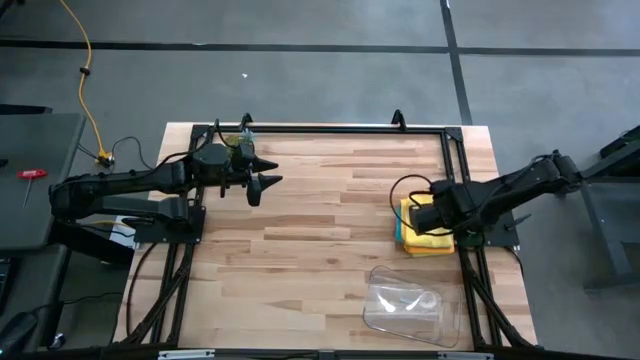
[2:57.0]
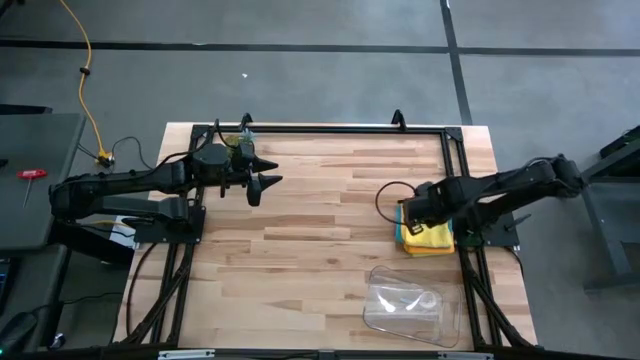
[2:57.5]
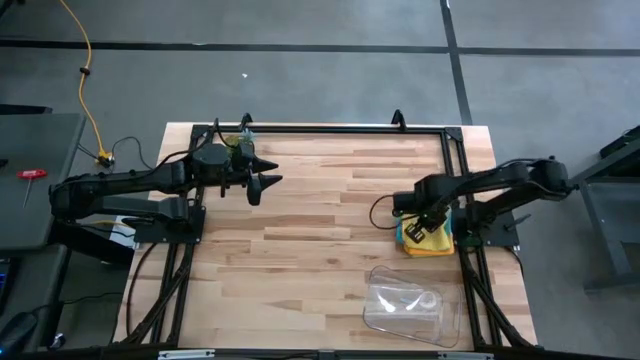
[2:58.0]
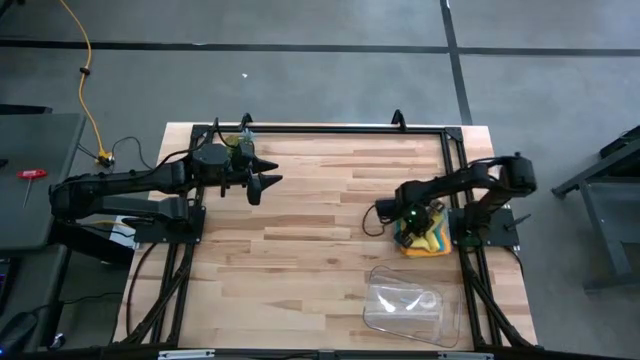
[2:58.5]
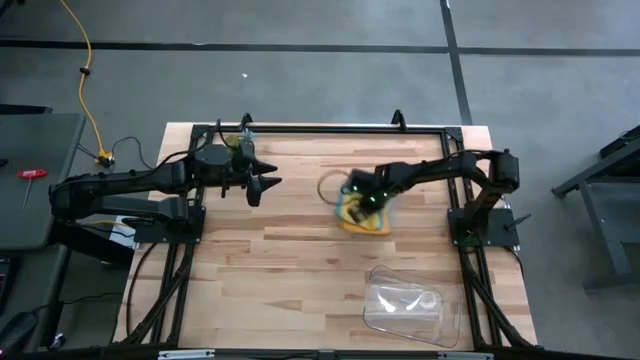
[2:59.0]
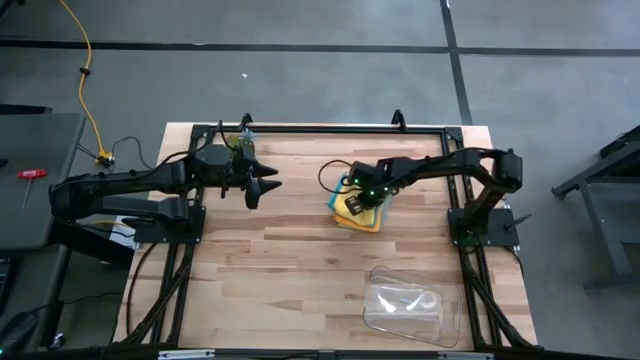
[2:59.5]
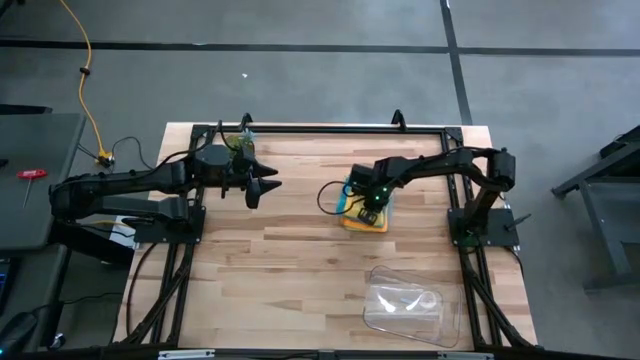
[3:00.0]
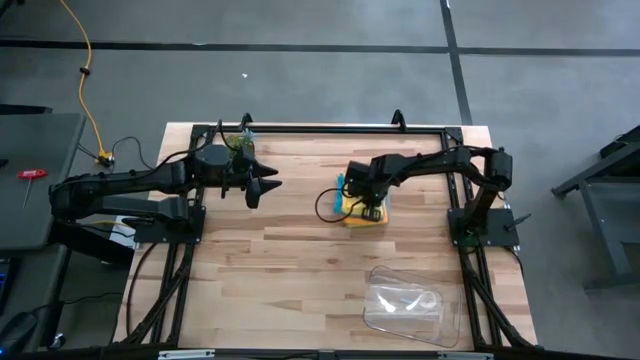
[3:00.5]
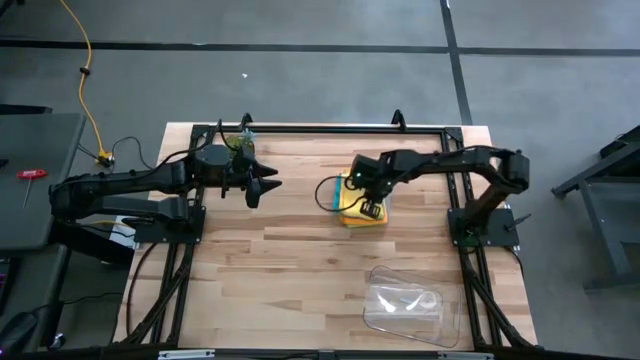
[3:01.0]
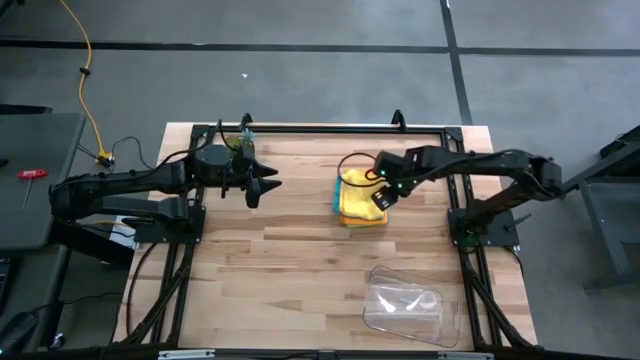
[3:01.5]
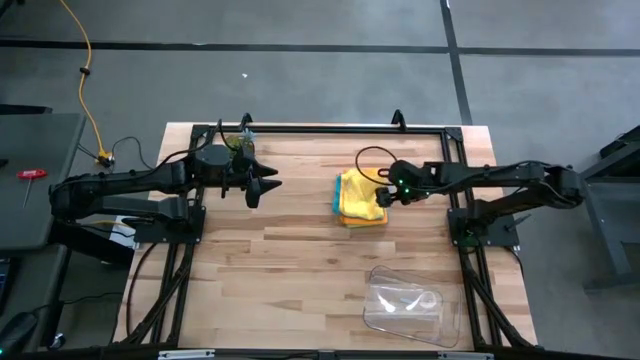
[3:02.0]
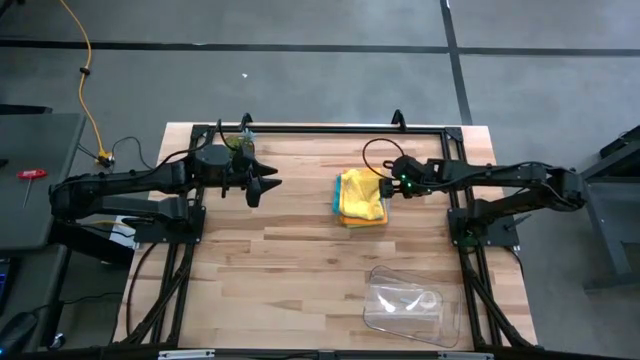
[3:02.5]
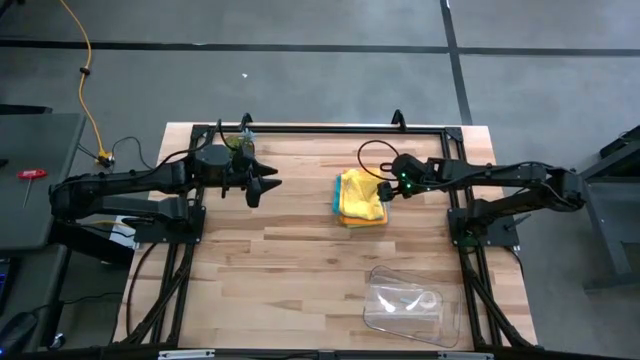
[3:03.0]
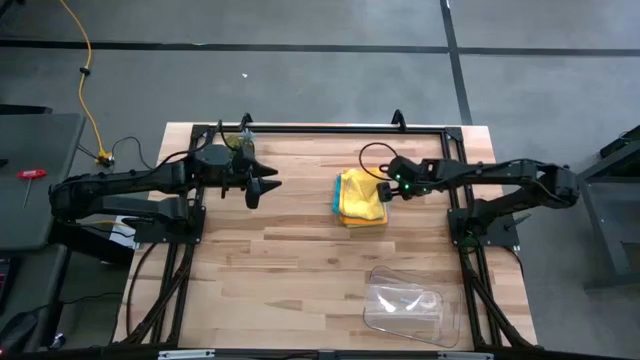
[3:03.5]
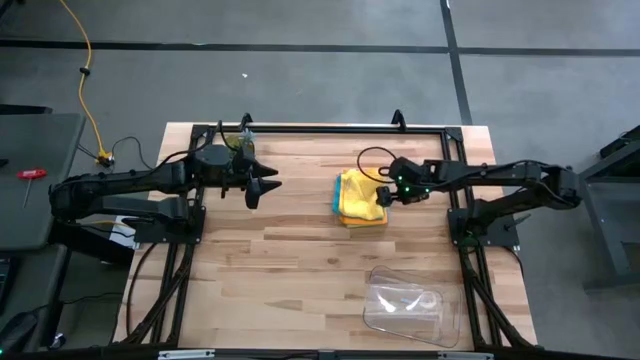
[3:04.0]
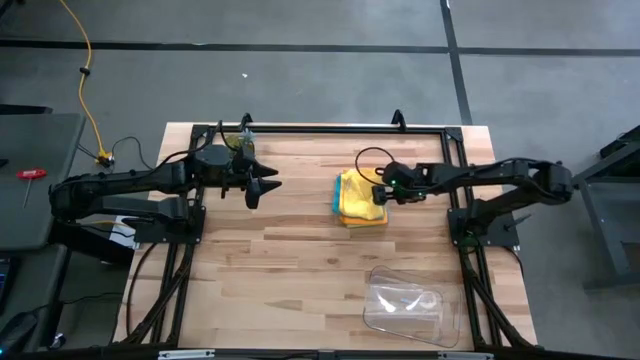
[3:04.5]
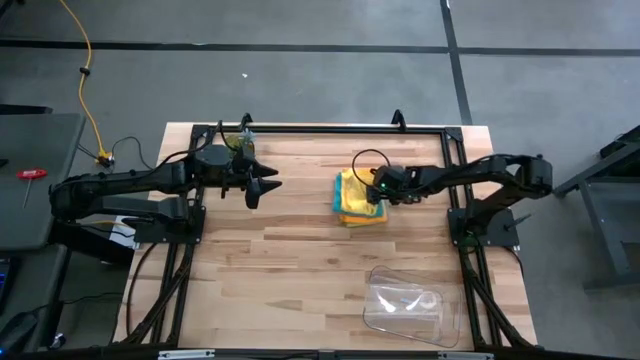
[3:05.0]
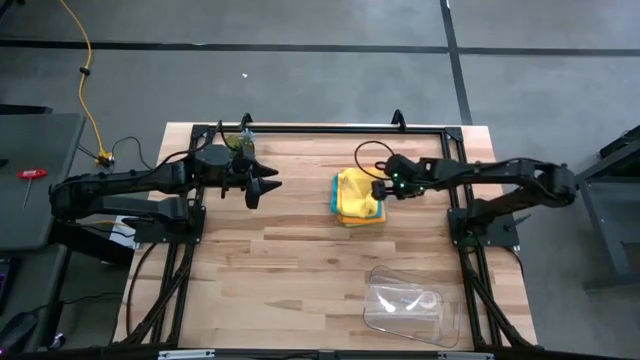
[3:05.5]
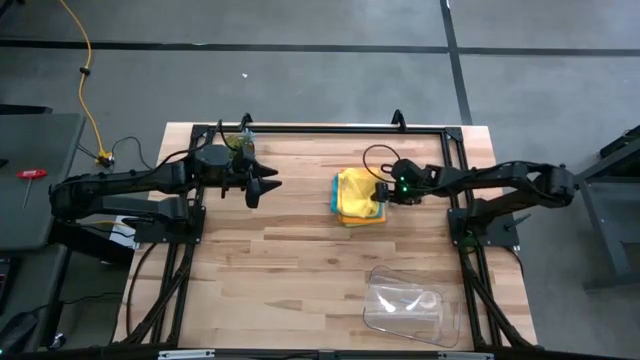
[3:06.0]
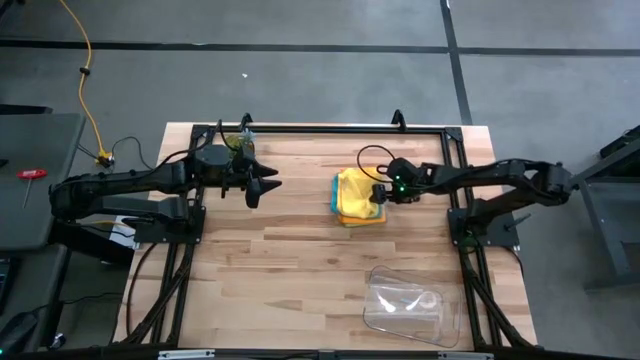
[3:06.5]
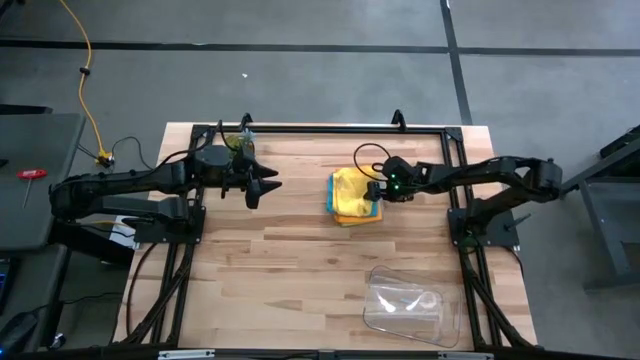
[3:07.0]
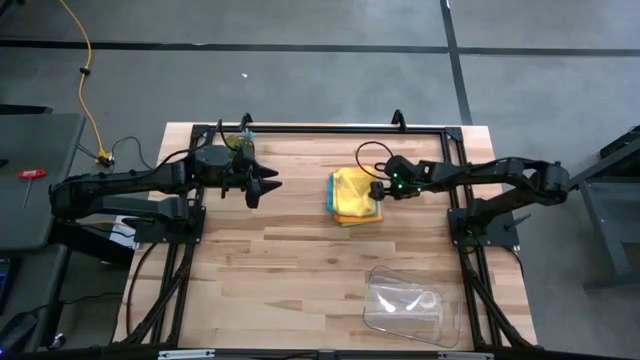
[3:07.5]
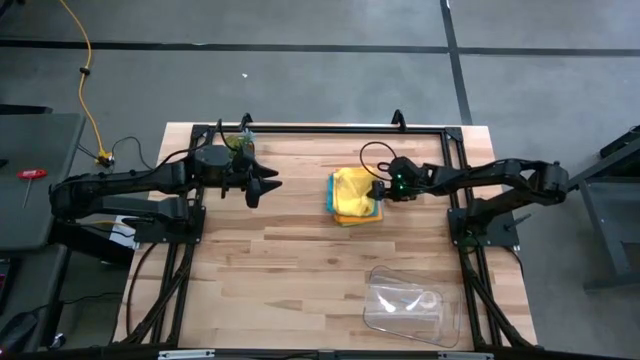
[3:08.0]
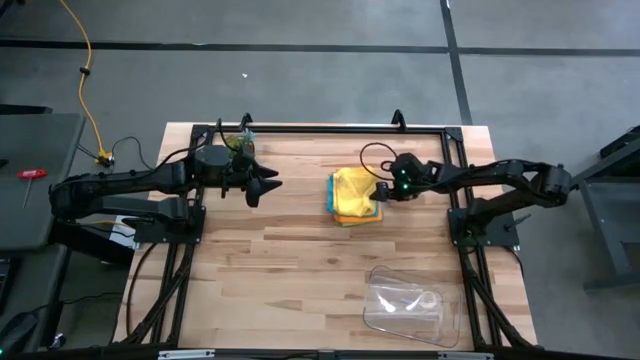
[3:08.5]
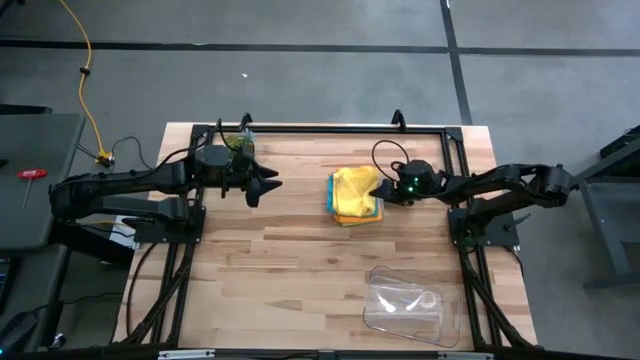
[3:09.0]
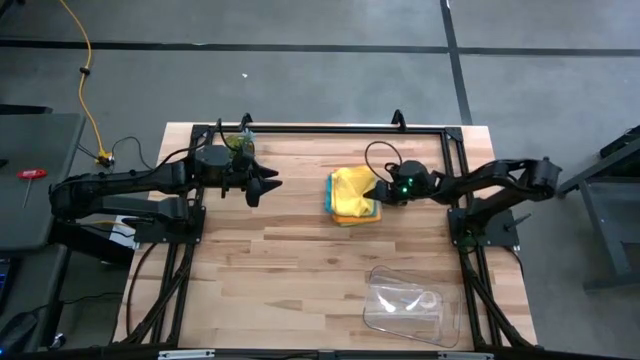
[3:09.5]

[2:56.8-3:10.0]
Task: Fold microfiber towels
Put the stacked folded cloths into the bin

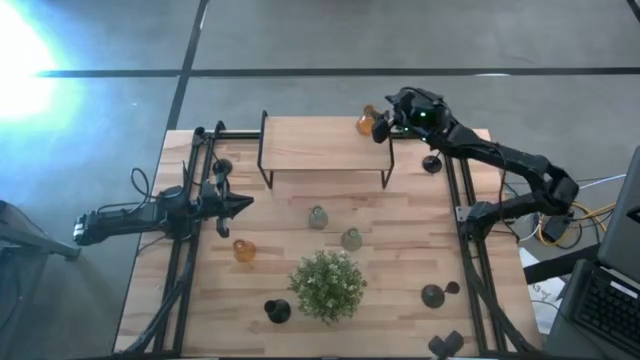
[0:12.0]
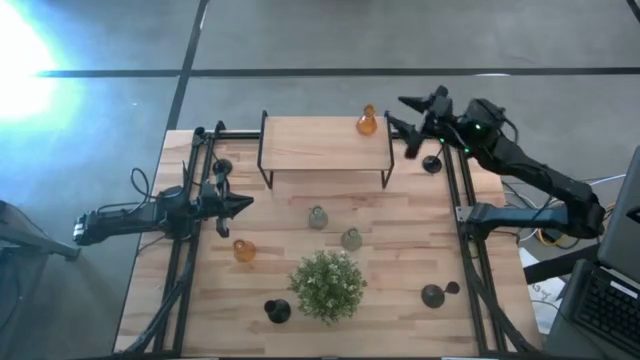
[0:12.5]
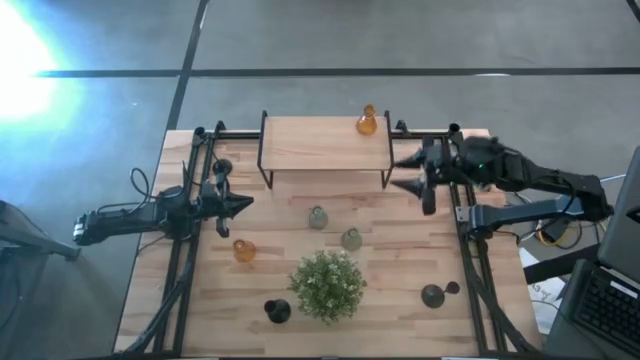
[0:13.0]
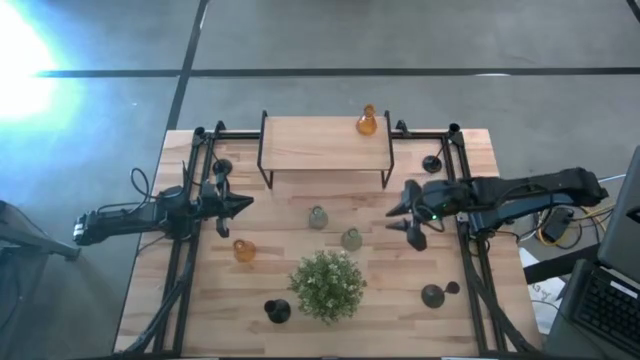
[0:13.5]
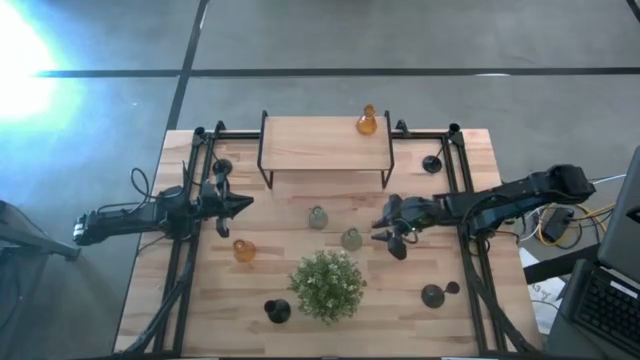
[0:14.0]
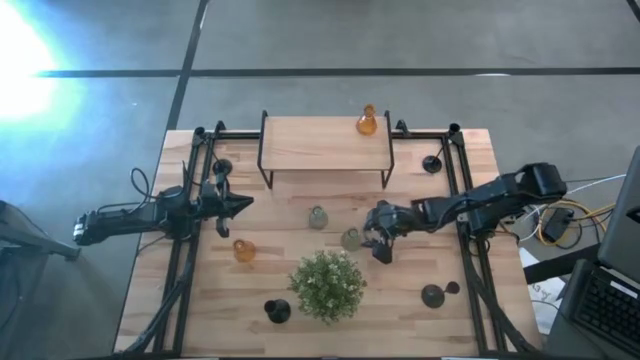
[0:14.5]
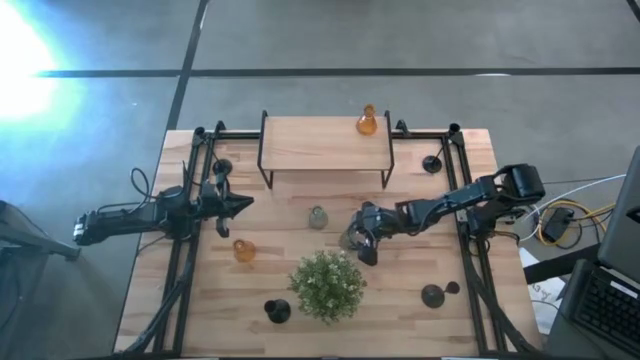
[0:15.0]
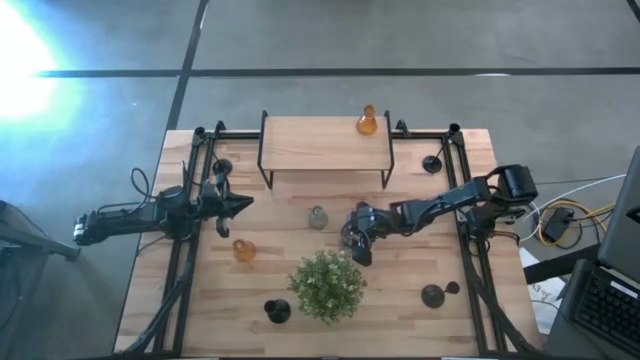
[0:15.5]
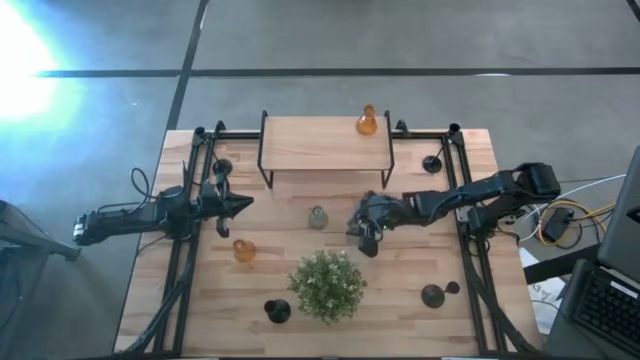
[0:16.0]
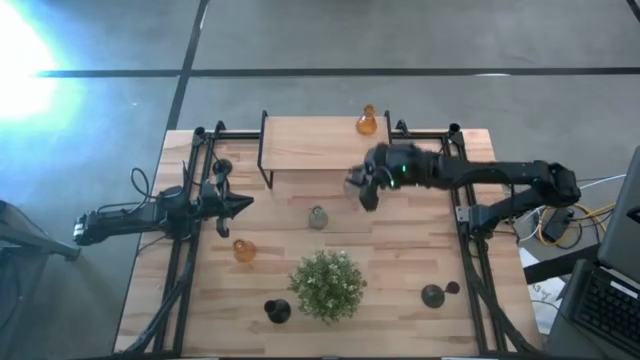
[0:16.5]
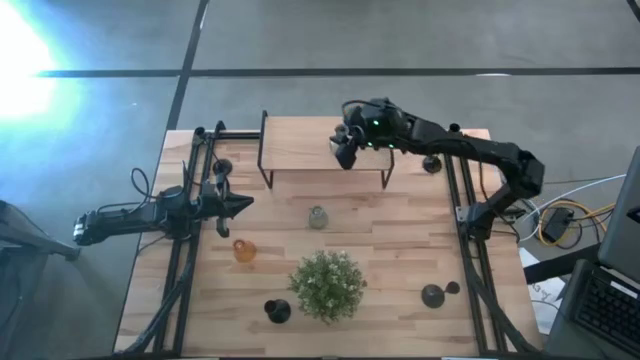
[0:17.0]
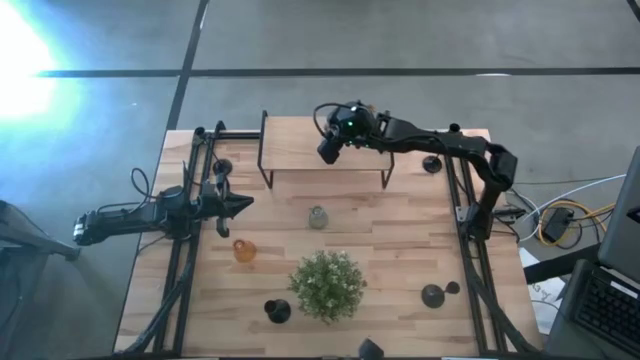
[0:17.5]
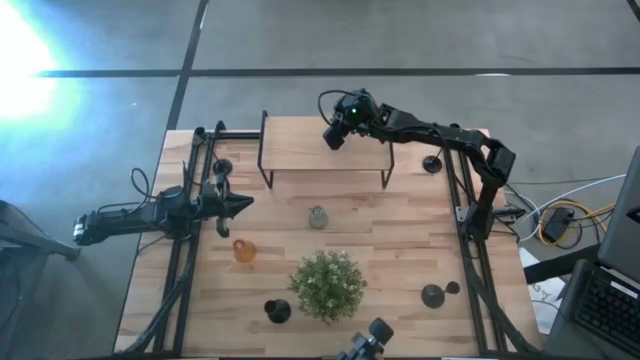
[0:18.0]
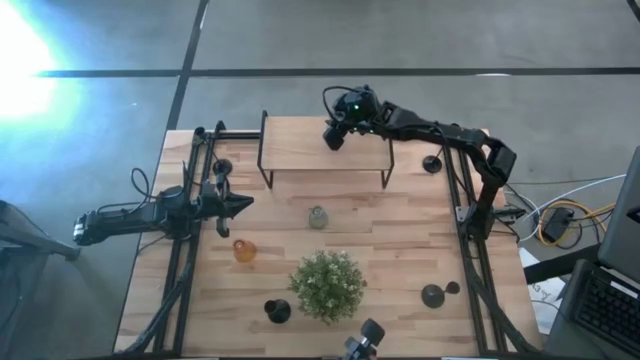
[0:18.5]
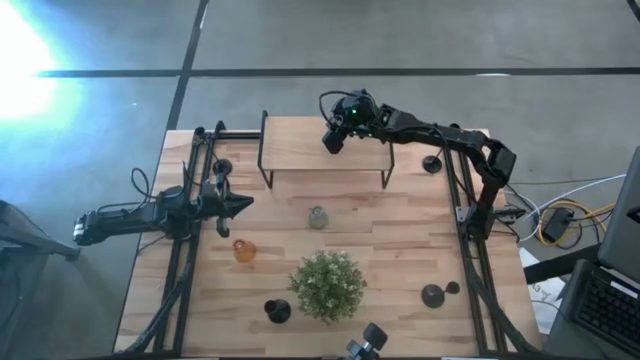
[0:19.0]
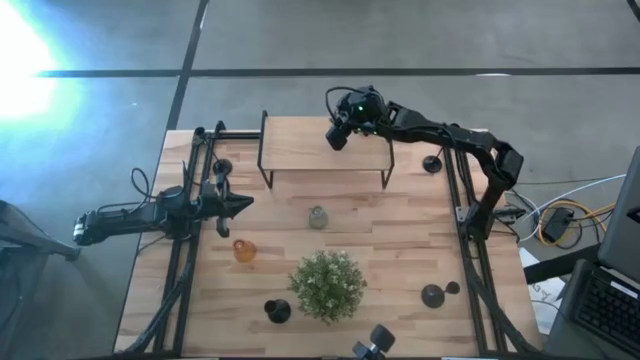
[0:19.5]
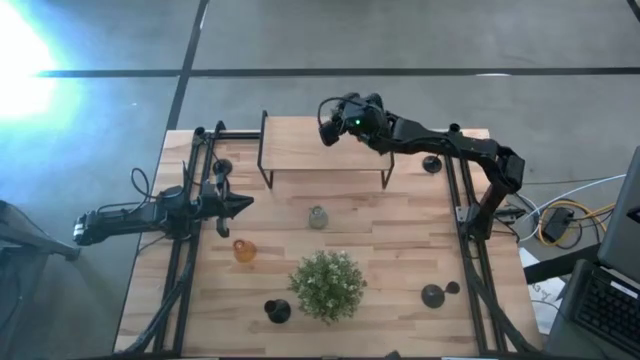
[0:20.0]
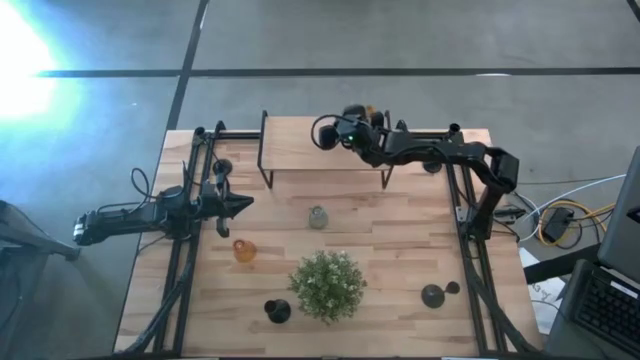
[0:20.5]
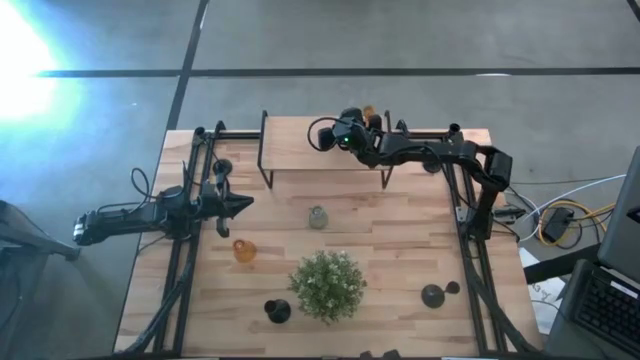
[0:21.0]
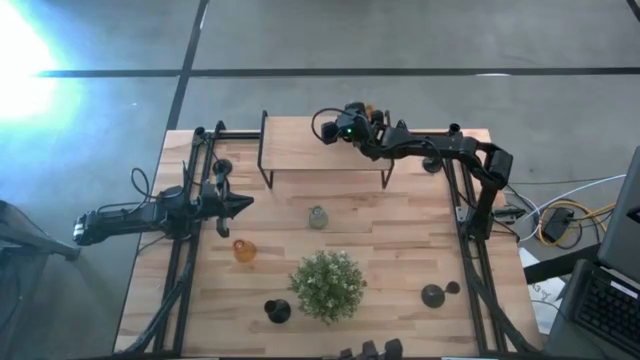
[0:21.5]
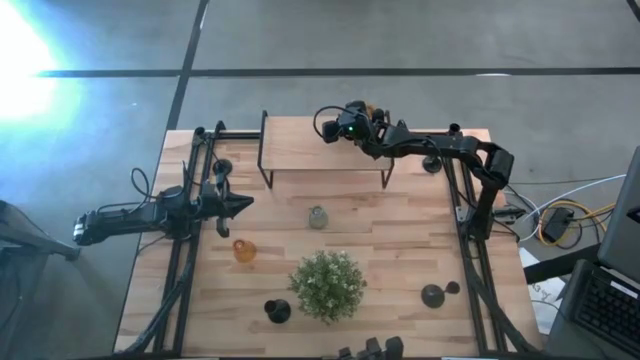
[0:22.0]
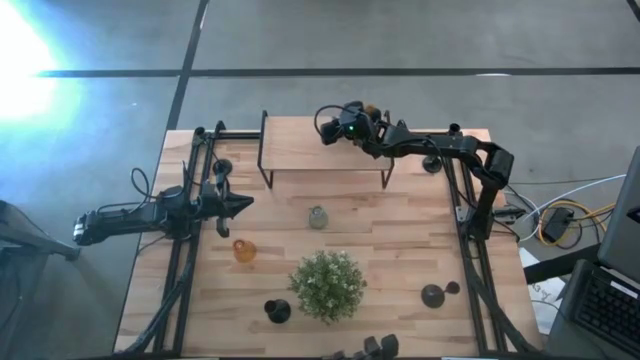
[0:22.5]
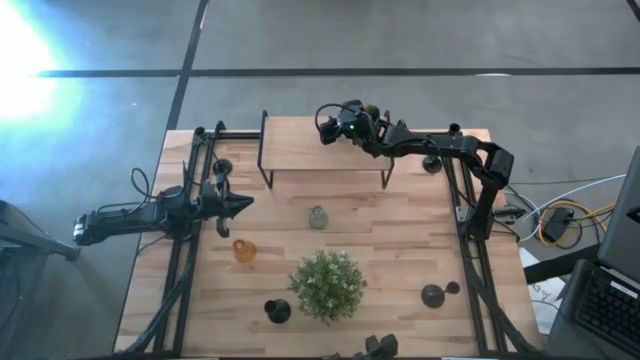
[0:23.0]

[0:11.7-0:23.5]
Task: Pick & Place candle stick holders
Put the green glass candle holder on the shelf aligned with the other glass candle holder
